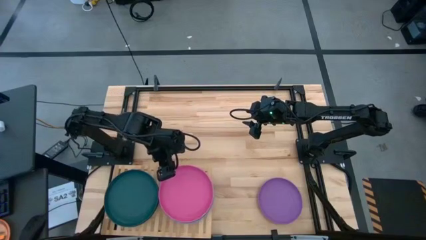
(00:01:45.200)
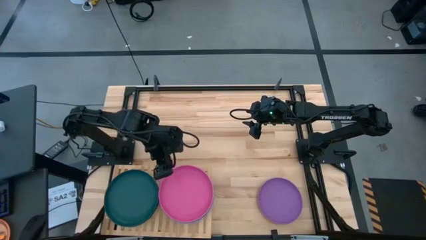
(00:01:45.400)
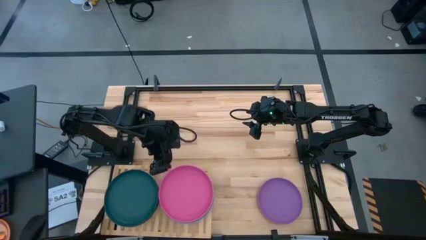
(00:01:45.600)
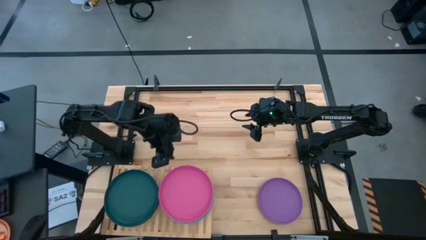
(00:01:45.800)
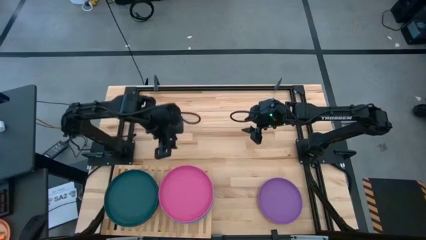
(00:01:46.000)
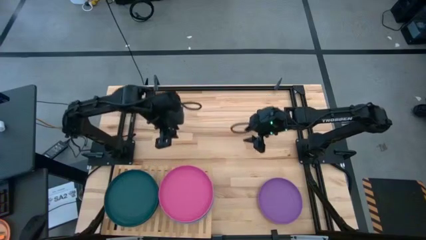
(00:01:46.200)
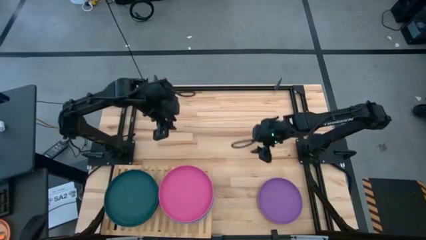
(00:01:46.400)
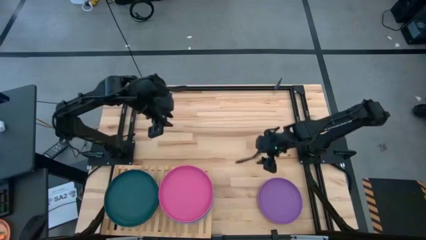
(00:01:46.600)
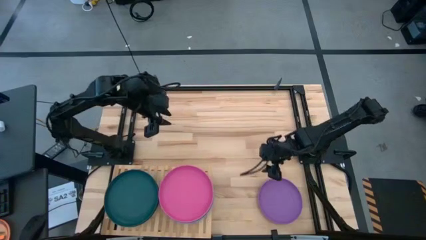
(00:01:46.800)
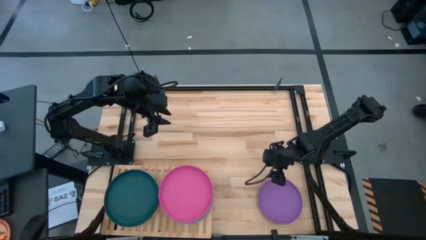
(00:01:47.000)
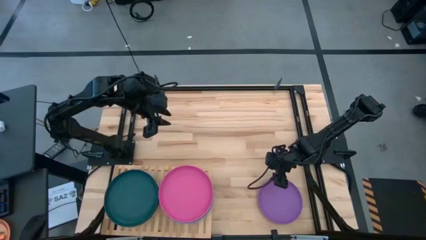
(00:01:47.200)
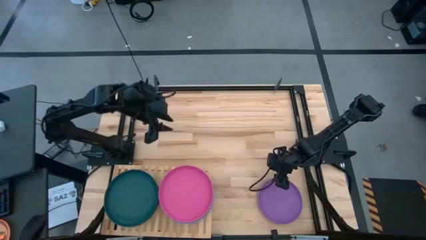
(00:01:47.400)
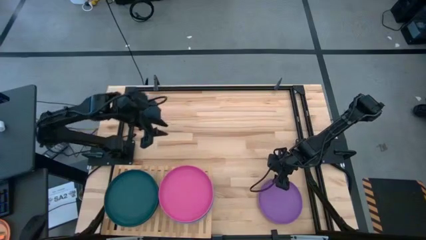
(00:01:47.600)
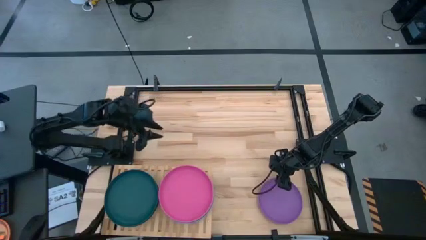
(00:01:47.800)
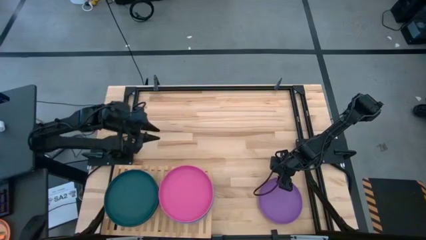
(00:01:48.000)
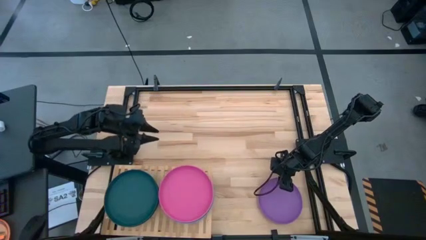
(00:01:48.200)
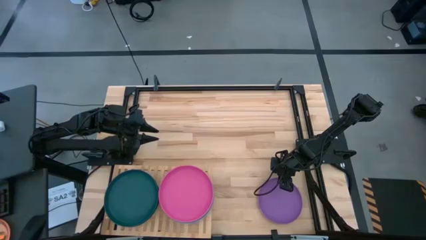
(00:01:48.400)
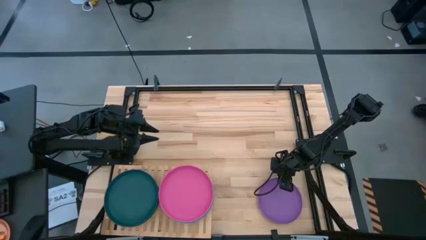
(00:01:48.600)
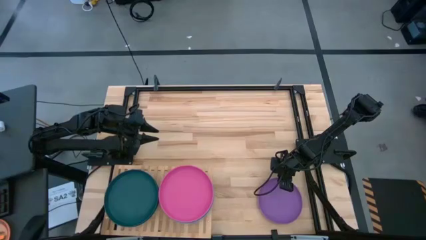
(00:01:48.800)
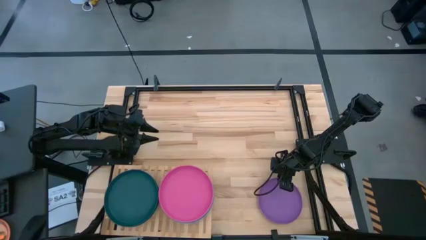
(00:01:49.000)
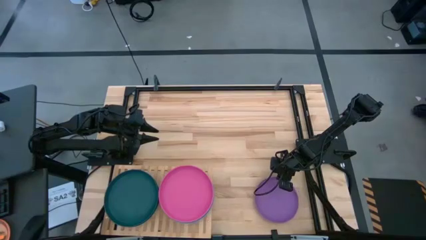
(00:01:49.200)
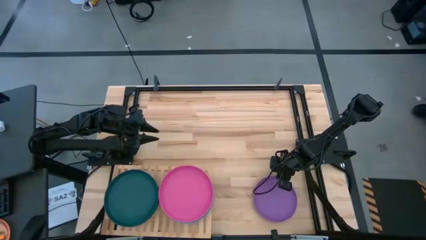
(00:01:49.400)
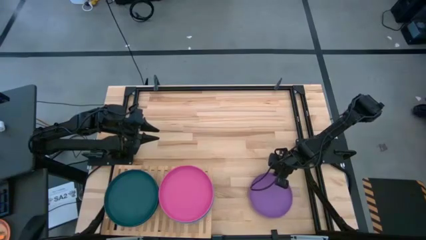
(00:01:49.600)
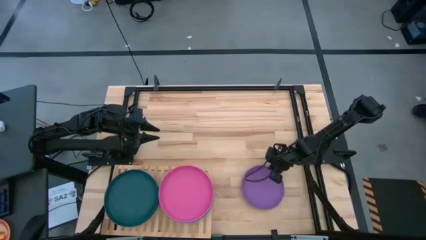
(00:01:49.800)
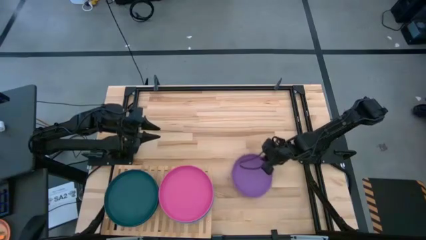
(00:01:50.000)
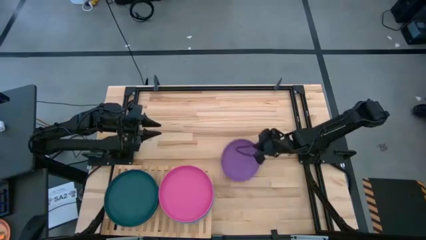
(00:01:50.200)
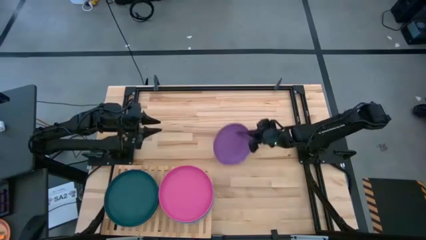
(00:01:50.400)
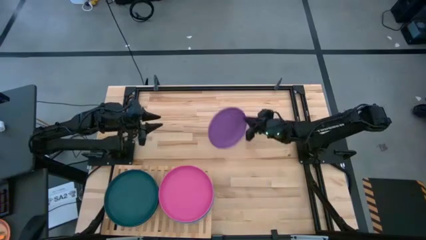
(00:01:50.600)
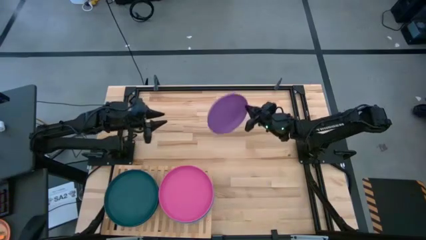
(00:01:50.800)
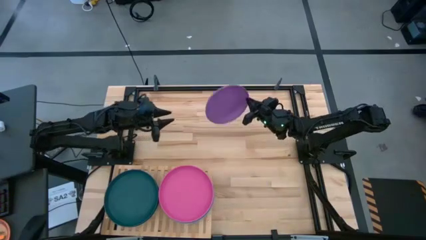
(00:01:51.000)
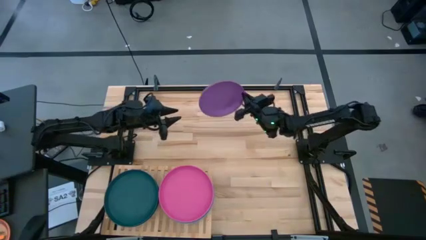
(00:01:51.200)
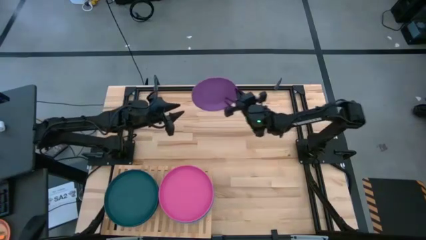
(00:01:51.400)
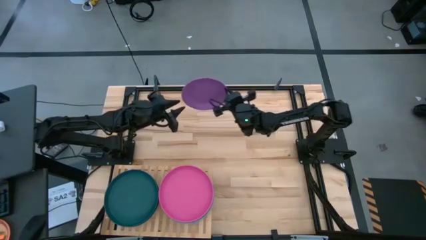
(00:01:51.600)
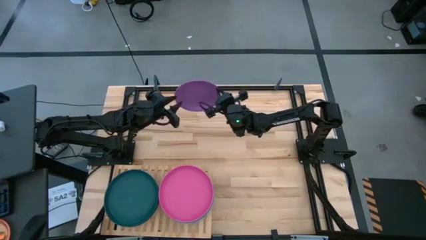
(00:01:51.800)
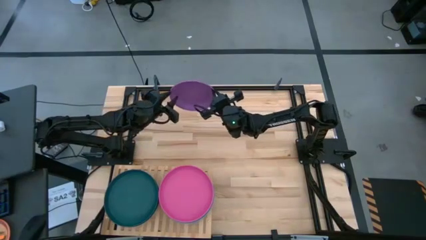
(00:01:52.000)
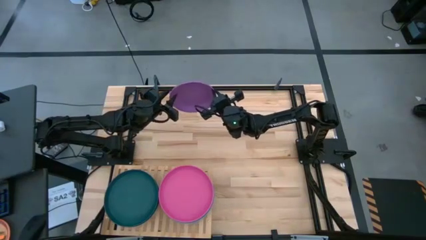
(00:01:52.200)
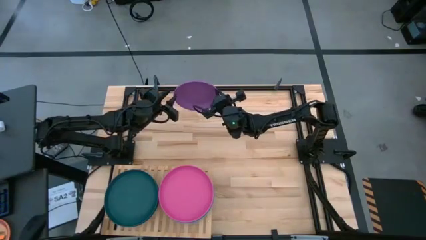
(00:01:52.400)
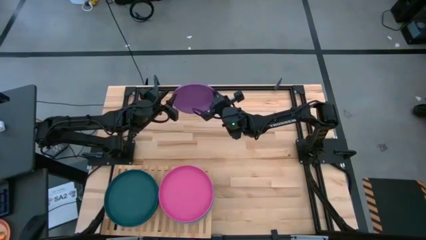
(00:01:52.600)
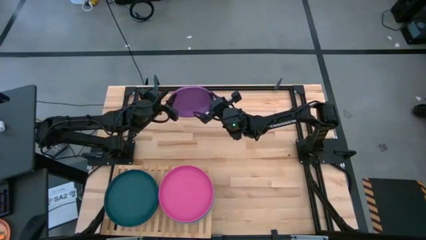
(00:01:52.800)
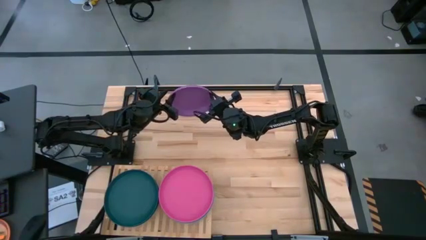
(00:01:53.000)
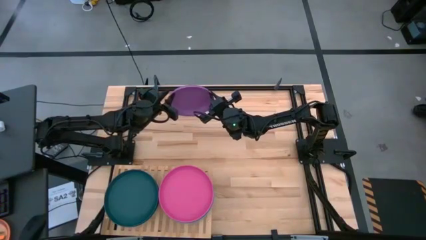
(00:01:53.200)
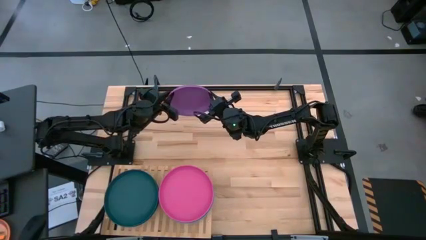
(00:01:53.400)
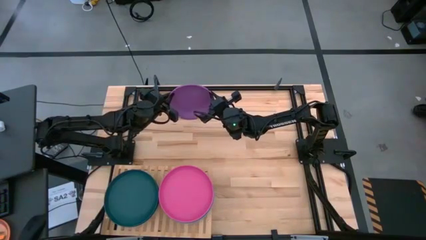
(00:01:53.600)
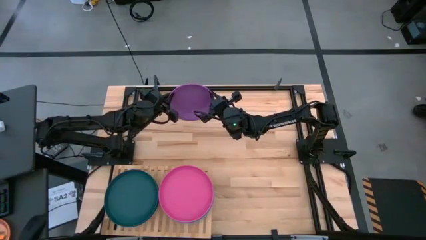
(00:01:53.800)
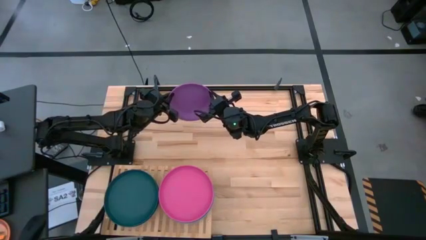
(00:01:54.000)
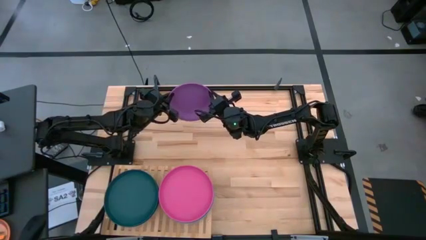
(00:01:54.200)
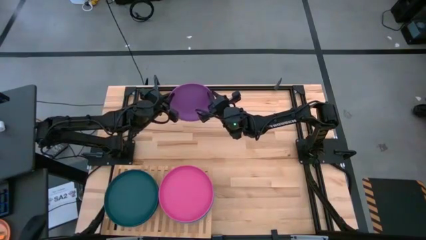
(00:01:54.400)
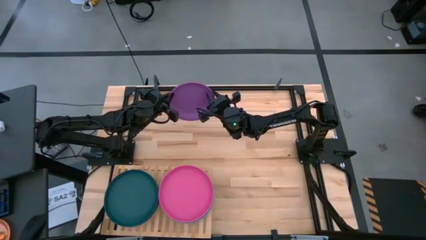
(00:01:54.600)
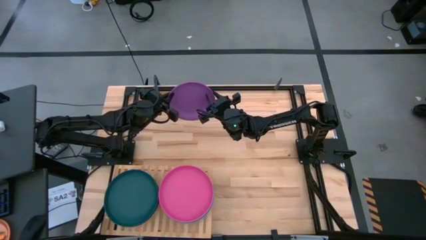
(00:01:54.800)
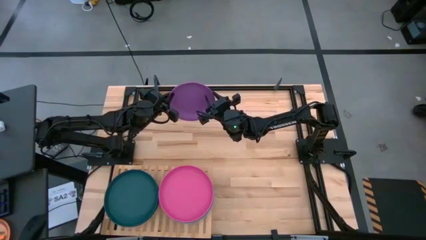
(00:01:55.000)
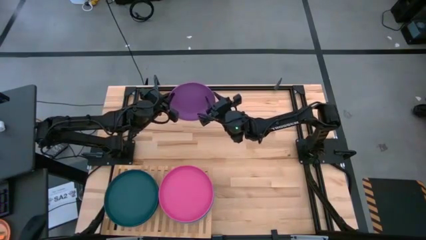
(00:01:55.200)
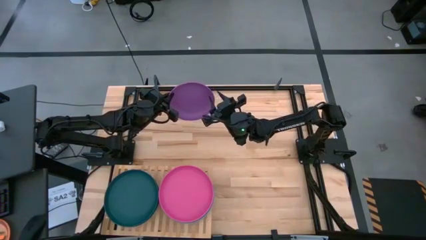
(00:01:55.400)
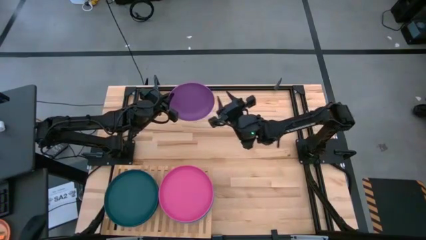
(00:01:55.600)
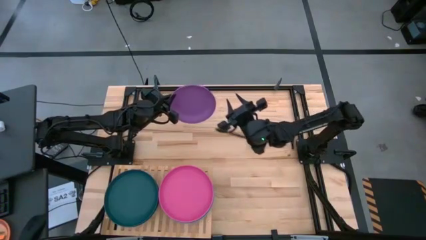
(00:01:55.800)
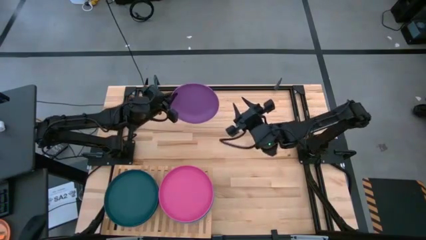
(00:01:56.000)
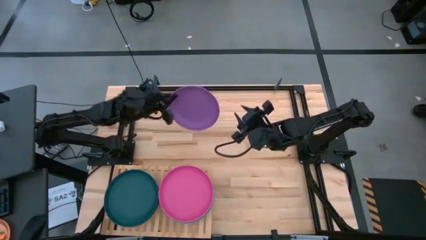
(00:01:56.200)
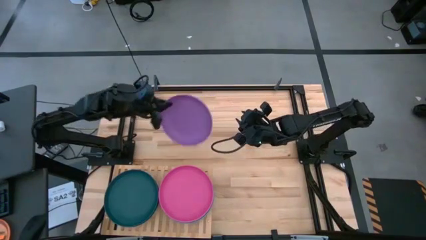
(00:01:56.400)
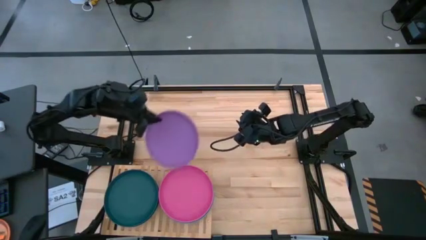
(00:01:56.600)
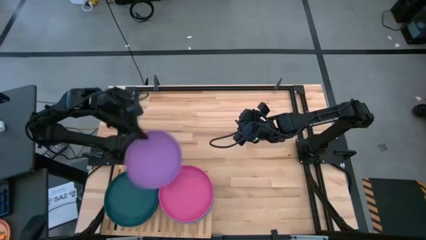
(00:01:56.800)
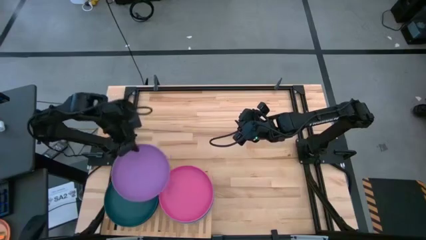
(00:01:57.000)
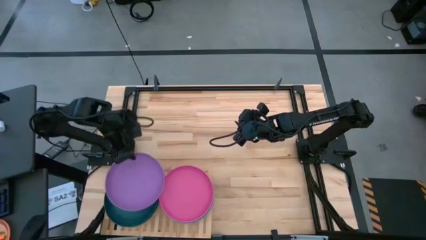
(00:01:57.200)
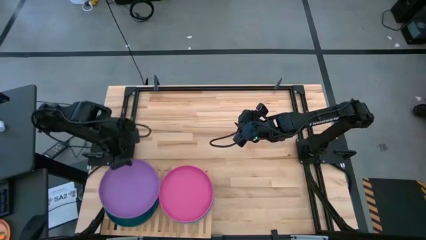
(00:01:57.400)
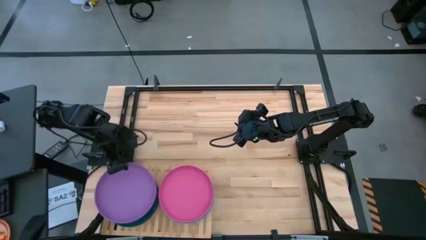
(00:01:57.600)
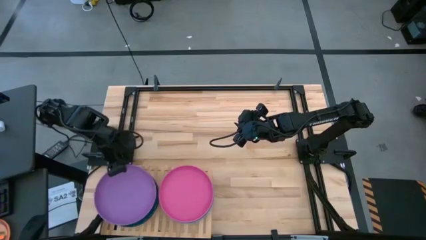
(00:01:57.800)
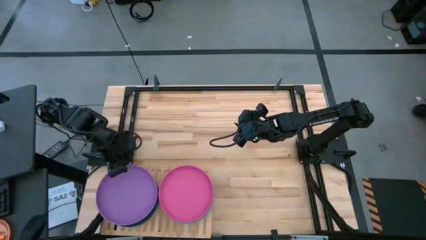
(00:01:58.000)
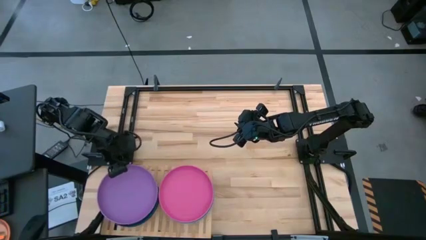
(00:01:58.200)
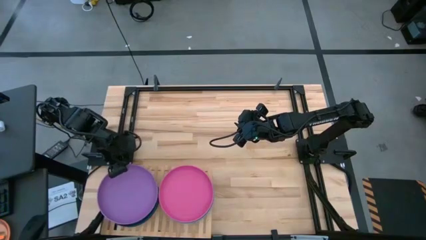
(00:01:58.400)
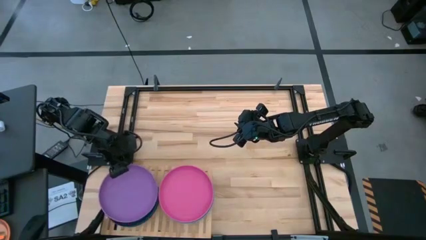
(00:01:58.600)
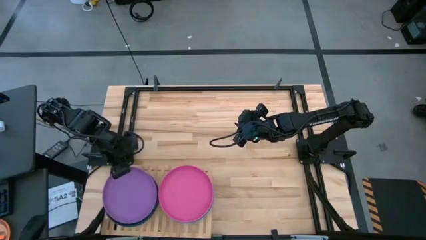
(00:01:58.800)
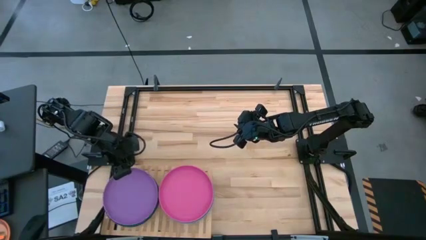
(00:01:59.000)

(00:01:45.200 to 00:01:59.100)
Task: Place and stack plates onto a shelf
Stack the purple plate on top of the dark green plate on the shelf
